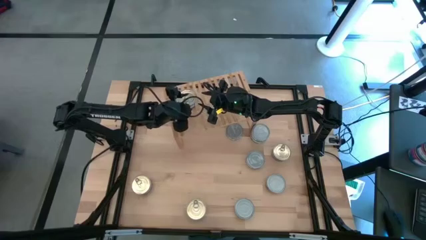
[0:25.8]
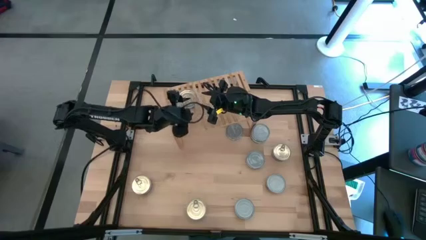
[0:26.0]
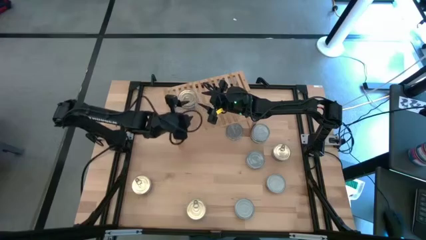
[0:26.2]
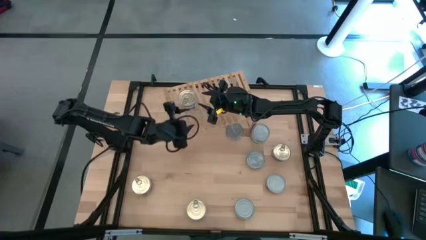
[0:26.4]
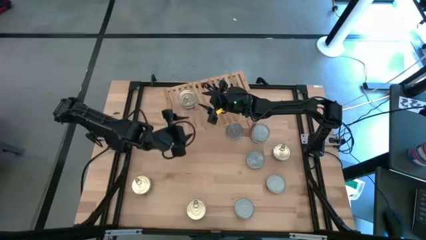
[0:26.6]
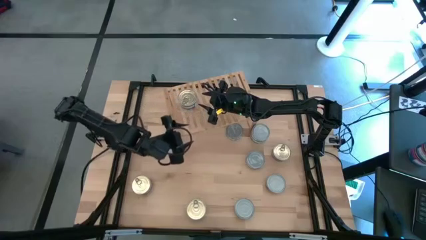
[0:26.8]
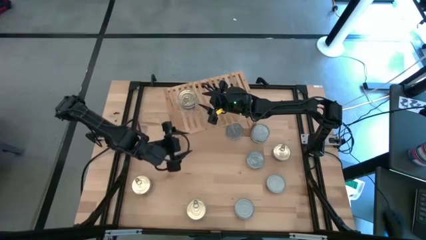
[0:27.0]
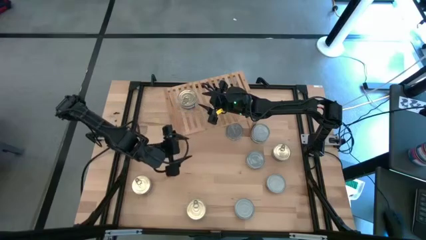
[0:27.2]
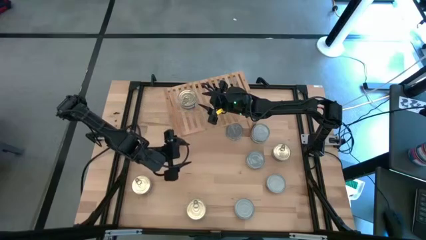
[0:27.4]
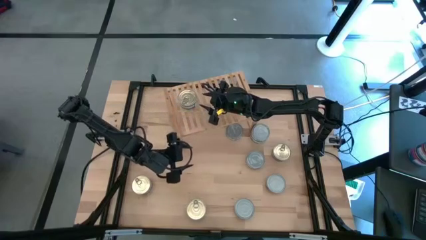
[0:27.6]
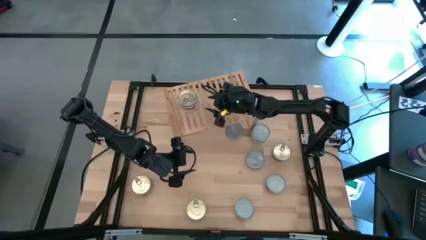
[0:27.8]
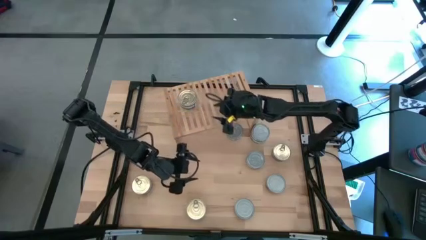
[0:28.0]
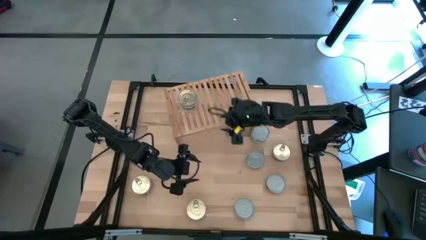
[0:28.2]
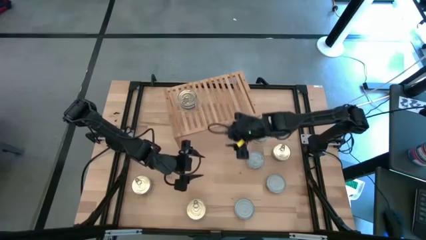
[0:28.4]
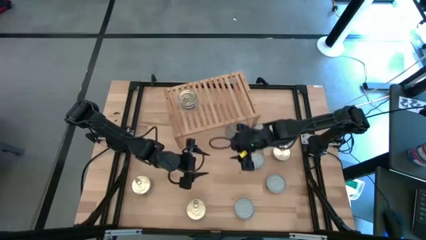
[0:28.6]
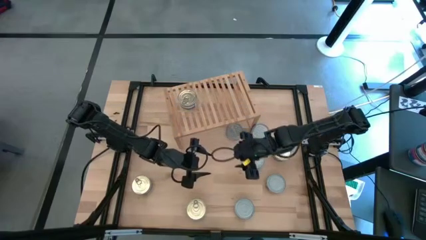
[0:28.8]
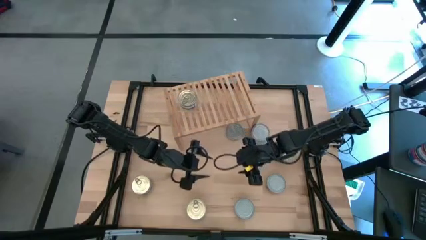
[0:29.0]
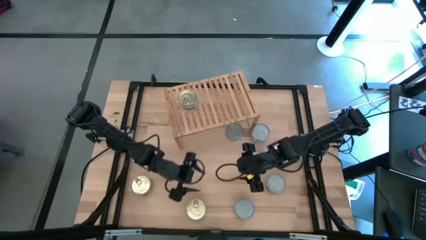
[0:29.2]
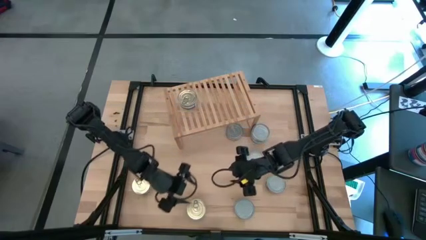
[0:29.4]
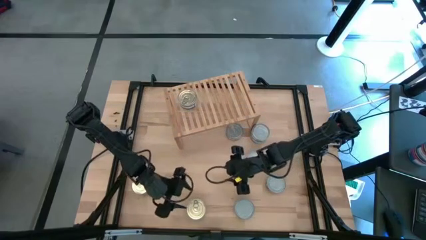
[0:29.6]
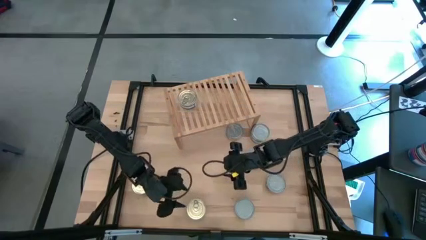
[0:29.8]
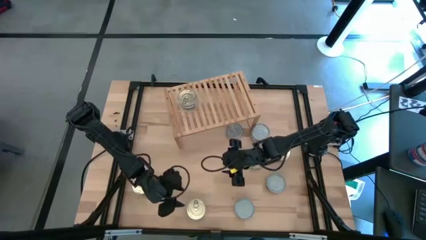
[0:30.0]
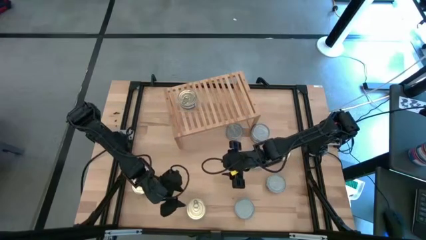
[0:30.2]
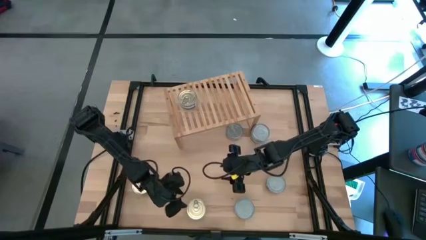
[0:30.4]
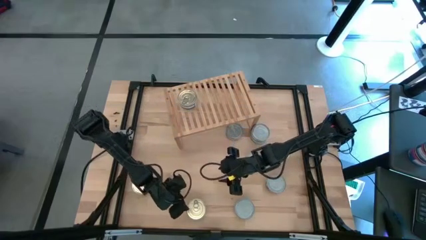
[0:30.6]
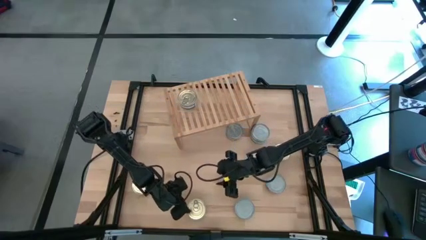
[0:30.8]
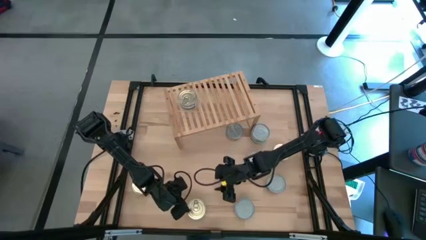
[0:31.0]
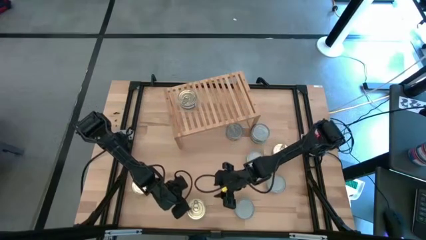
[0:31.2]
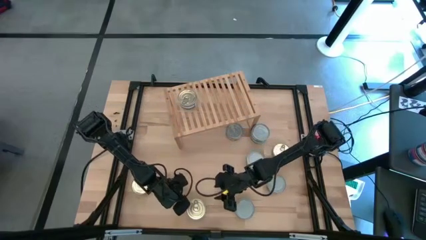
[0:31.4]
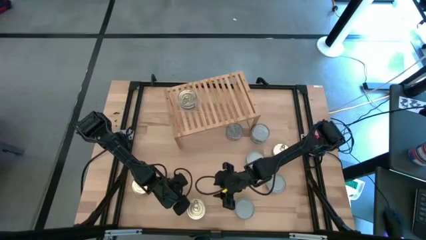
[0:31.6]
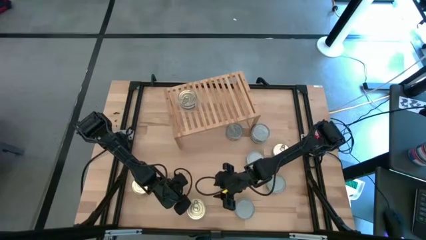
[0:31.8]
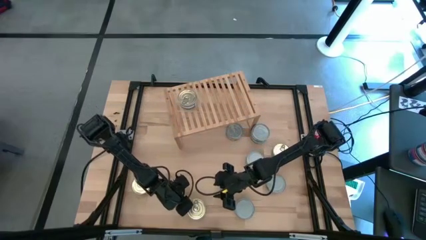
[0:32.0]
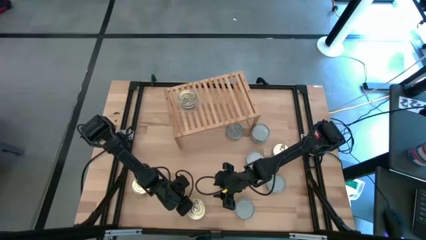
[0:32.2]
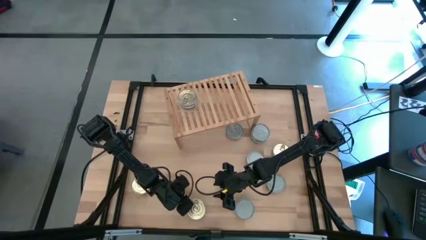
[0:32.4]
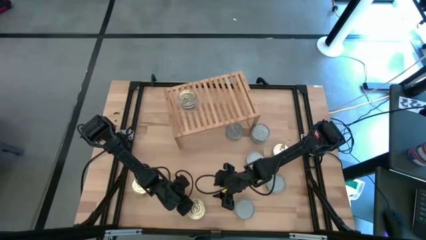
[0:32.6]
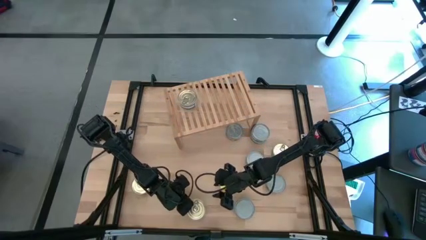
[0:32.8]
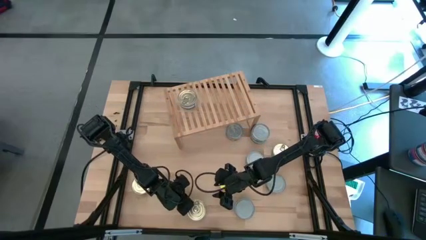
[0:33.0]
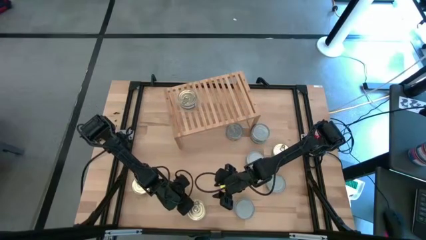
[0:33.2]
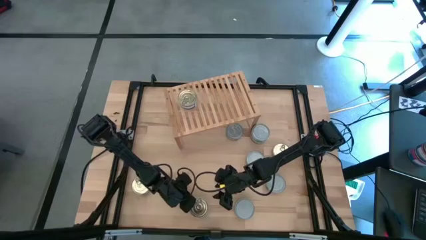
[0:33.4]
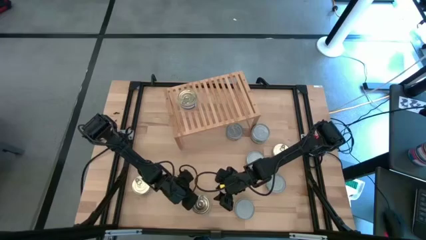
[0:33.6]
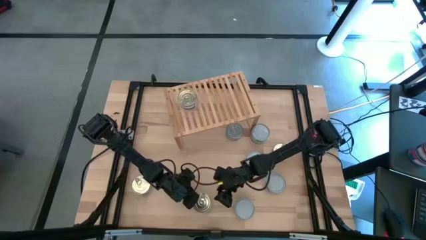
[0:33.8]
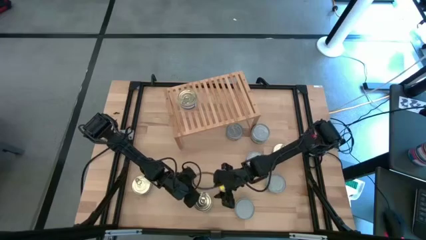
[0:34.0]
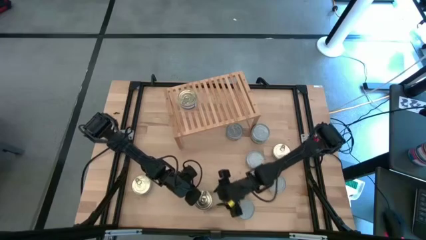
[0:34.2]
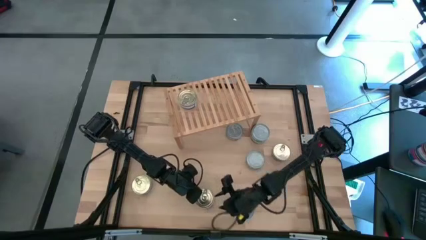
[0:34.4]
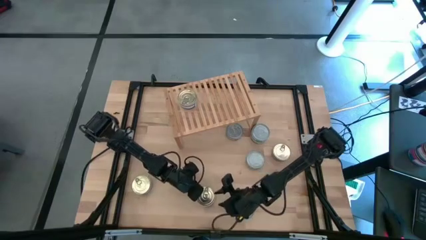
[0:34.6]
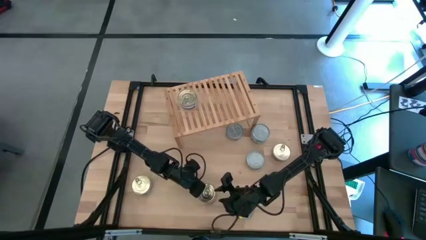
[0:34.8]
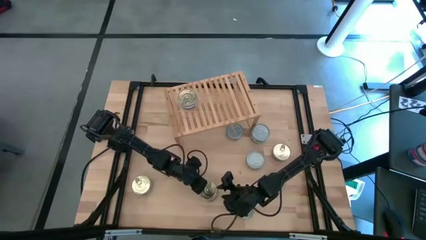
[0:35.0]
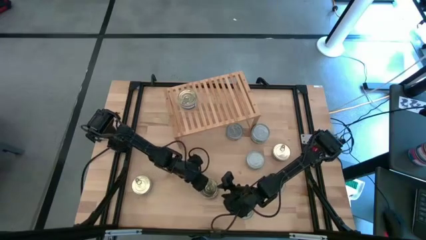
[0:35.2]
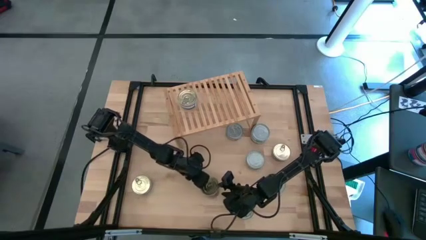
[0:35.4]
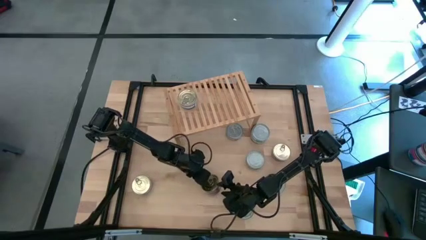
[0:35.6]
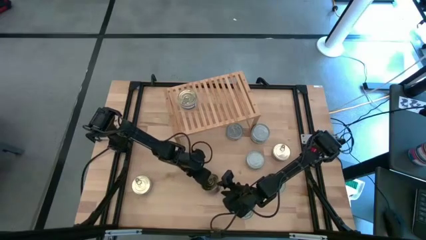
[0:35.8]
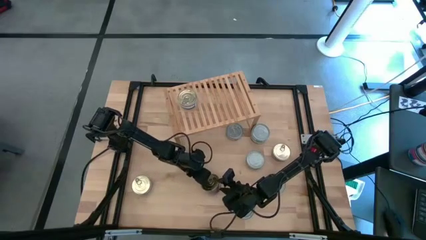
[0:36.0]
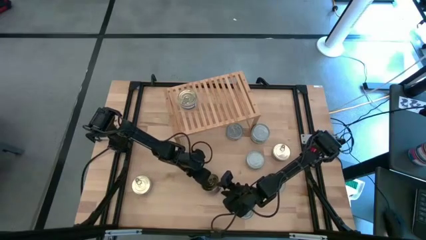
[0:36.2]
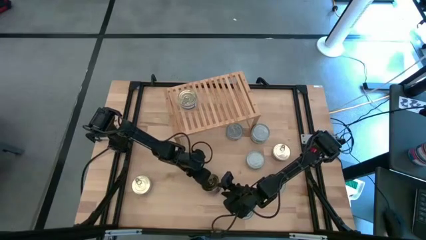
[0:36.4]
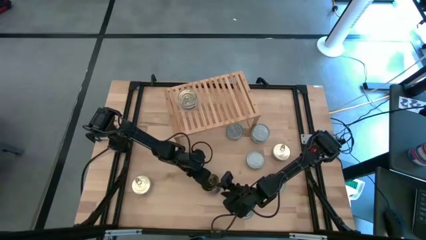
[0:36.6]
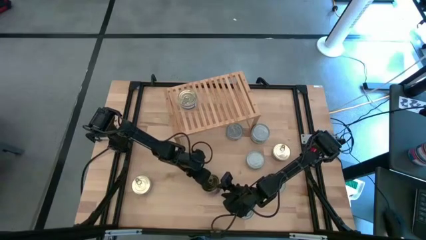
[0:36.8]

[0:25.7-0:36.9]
Task: Stack canned seafood by type on shelf
Stack the blue tuna can on top of the blue tuna can on the shelf
